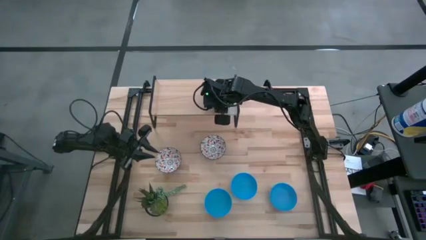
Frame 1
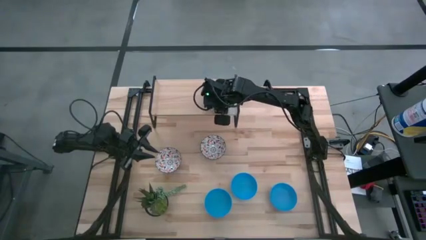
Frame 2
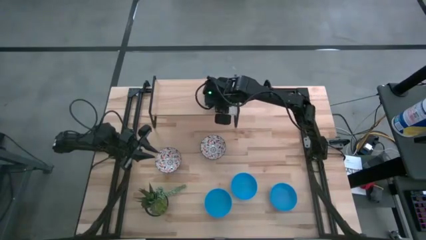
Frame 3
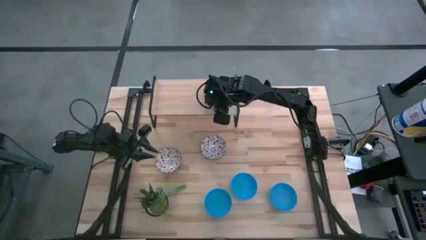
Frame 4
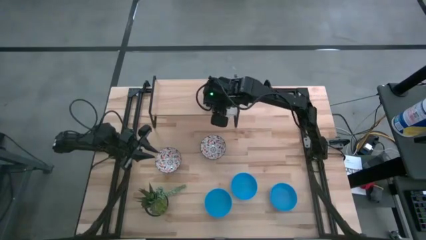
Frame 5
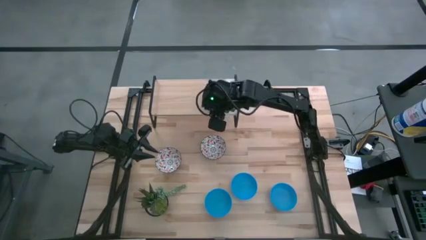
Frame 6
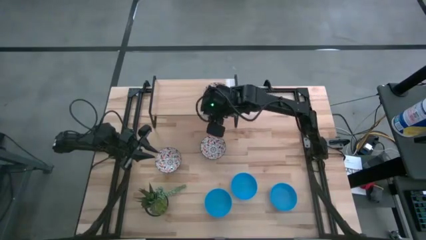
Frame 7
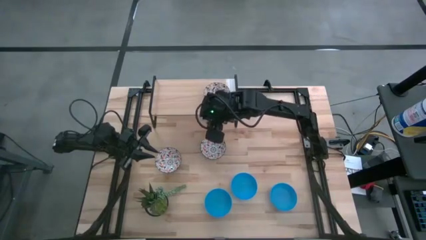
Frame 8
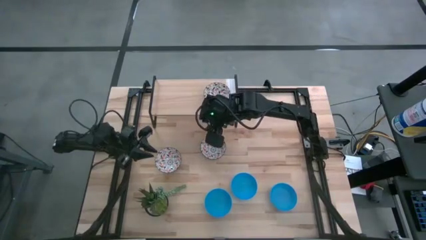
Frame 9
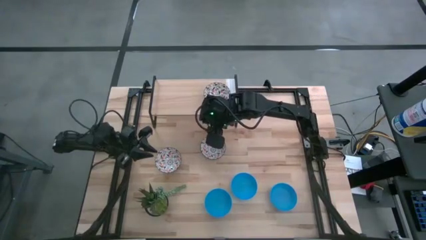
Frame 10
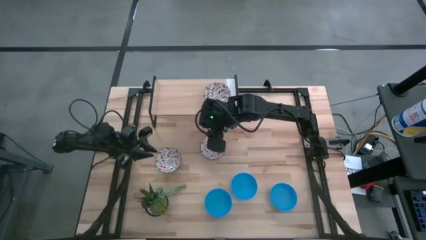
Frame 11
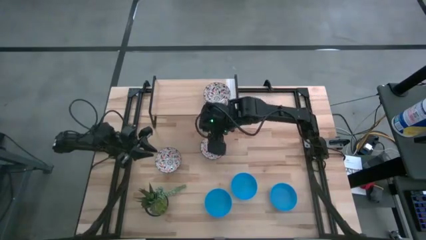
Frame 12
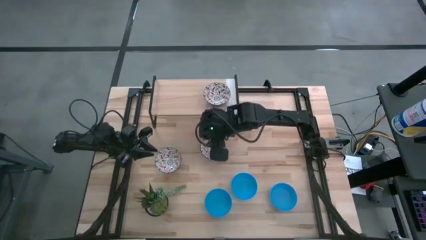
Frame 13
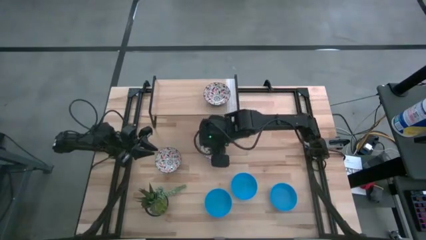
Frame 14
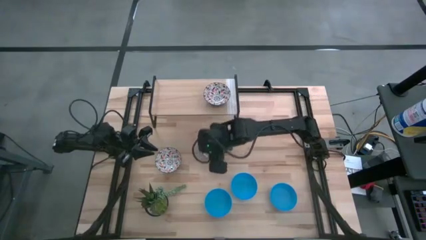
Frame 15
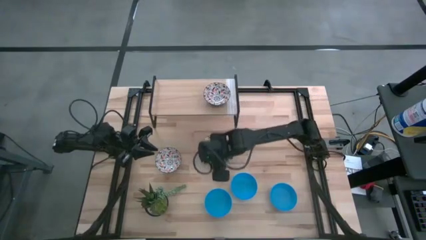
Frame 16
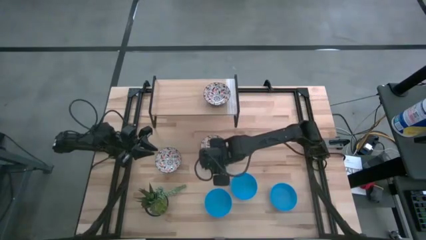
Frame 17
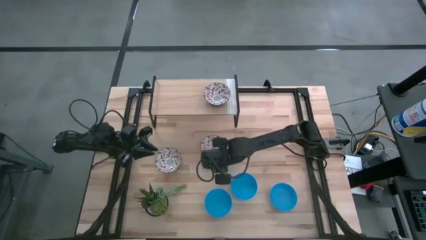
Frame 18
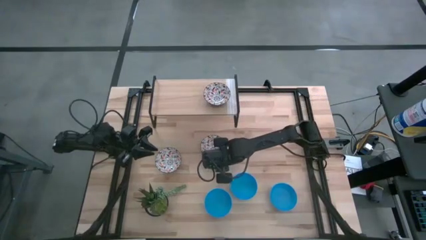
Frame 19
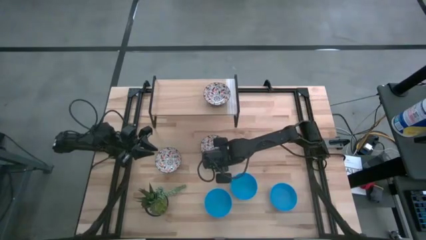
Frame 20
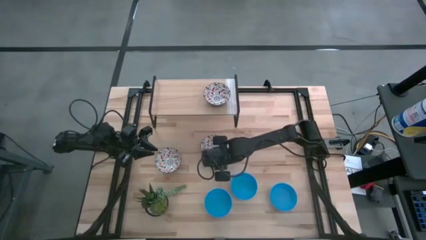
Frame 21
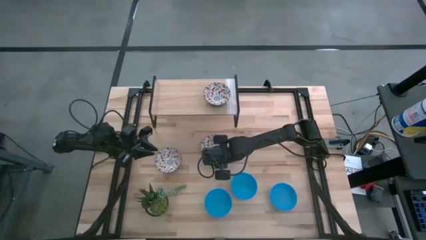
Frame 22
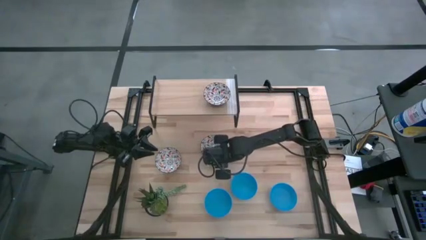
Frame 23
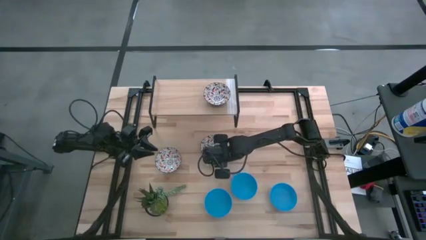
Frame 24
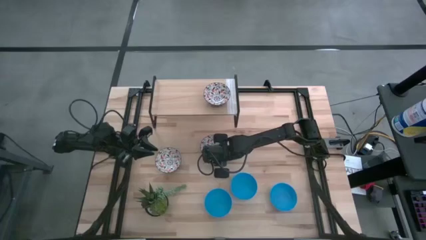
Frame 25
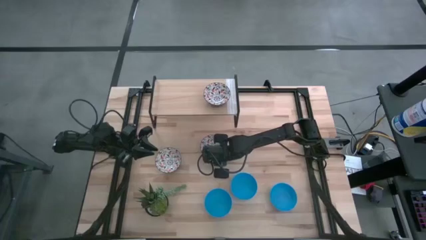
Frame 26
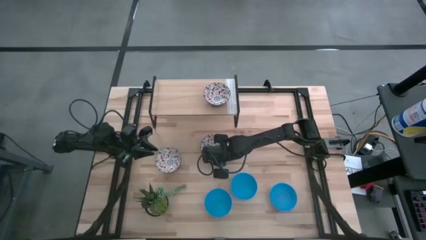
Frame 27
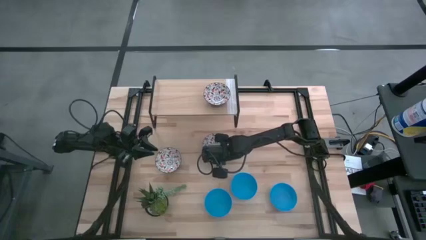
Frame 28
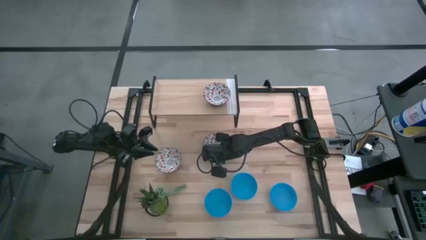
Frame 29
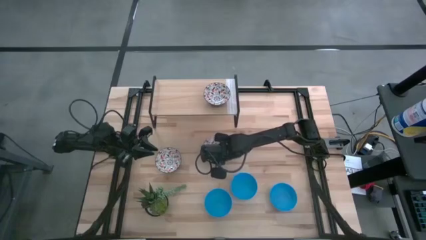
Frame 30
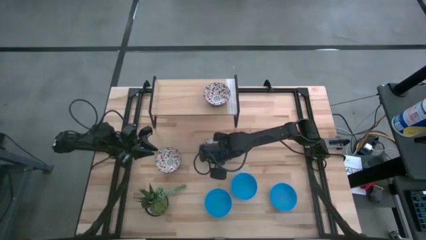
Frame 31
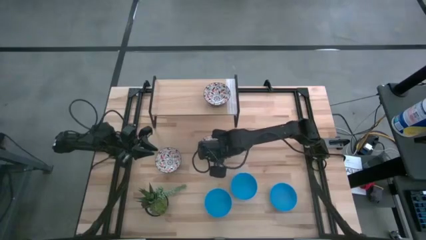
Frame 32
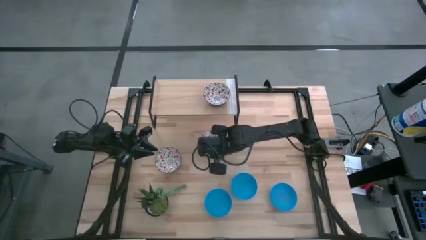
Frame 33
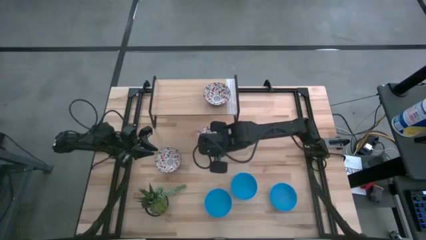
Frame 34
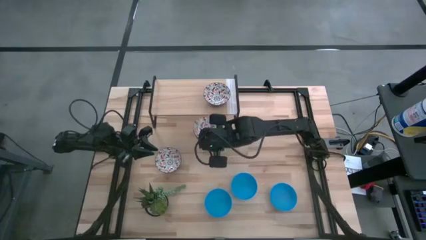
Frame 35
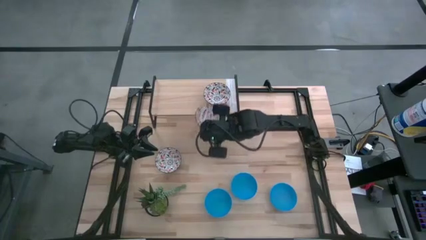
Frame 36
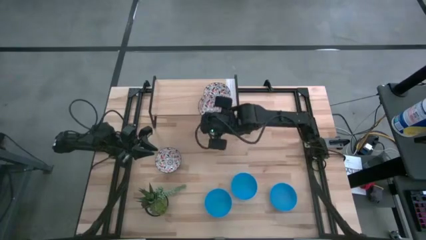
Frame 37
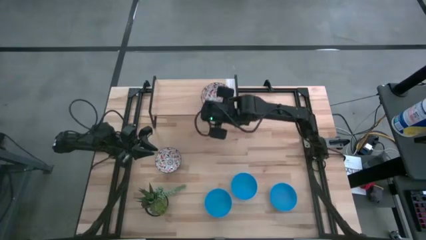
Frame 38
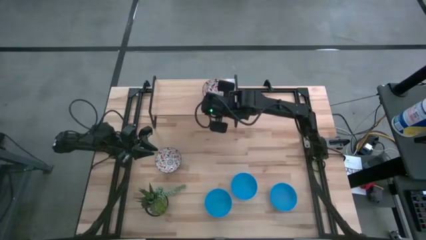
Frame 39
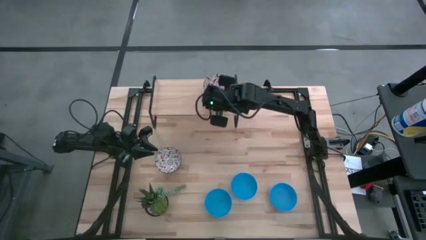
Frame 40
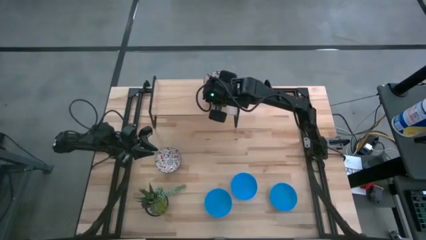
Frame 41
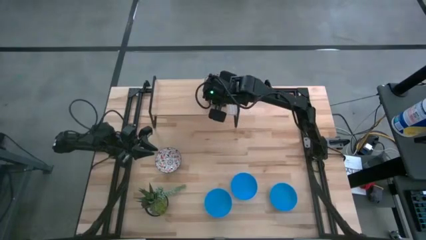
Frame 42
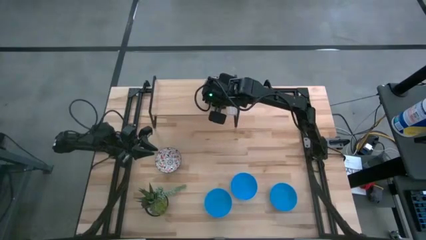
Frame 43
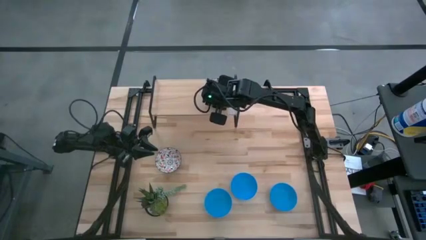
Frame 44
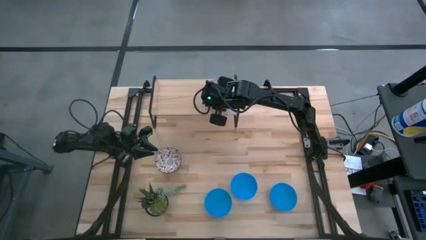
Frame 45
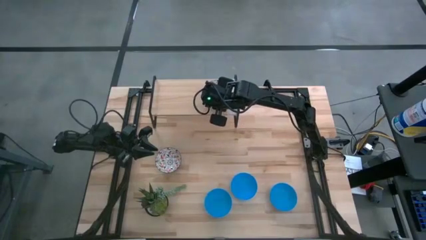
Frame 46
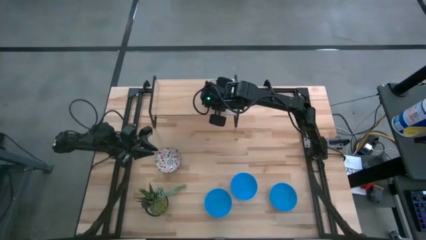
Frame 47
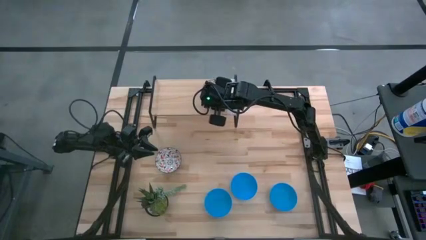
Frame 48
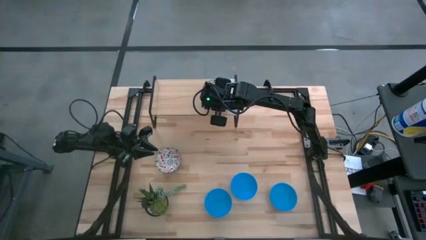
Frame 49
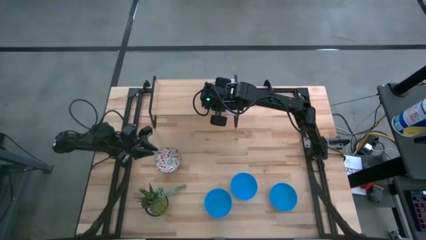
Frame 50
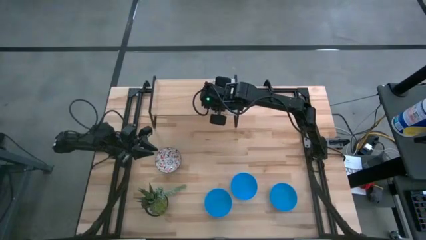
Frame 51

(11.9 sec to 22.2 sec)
Task: Pick & Place Mini bowls
Stack the white patterned bowl on the white patterned bowl on the shelf
